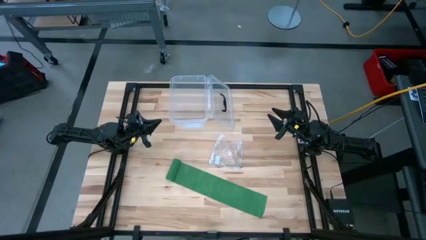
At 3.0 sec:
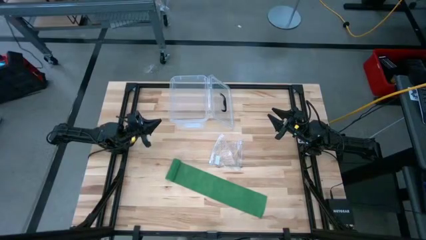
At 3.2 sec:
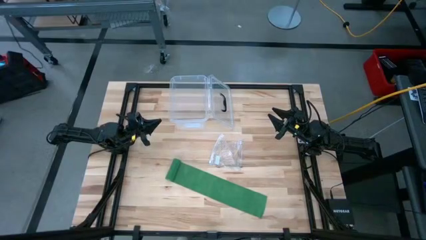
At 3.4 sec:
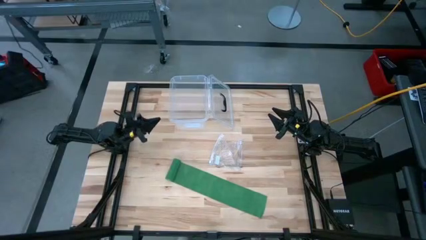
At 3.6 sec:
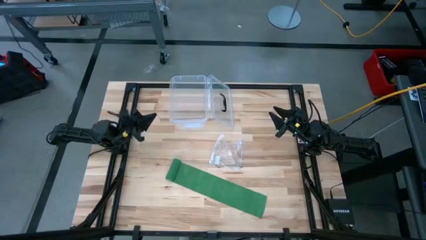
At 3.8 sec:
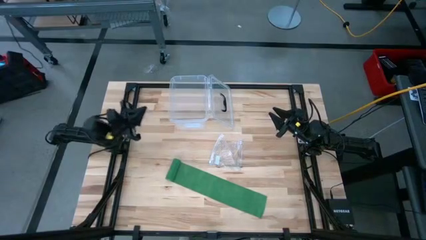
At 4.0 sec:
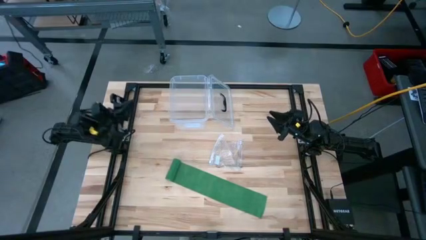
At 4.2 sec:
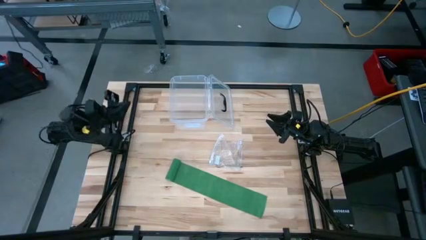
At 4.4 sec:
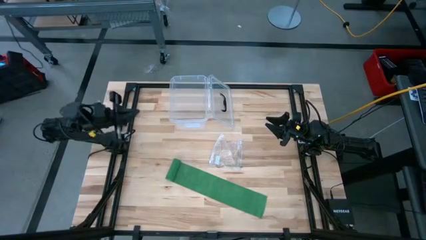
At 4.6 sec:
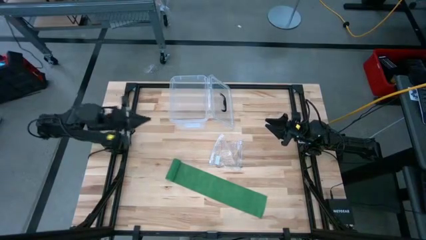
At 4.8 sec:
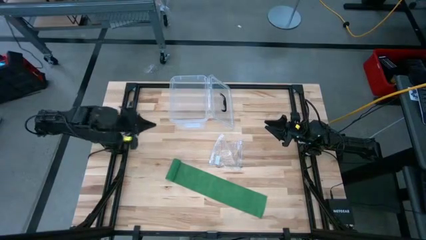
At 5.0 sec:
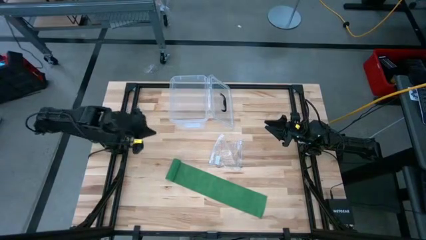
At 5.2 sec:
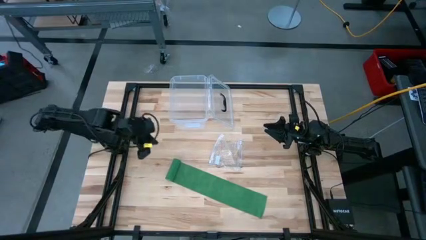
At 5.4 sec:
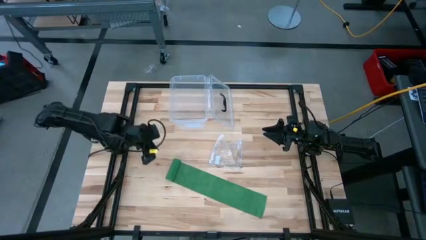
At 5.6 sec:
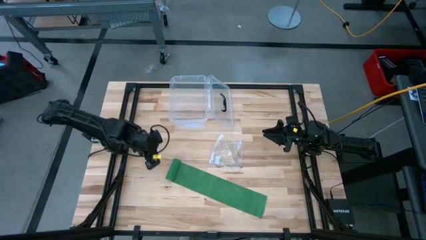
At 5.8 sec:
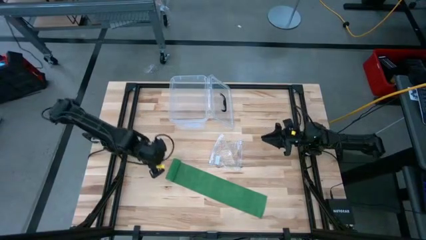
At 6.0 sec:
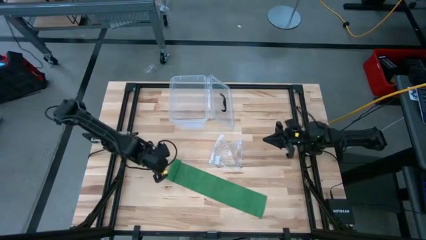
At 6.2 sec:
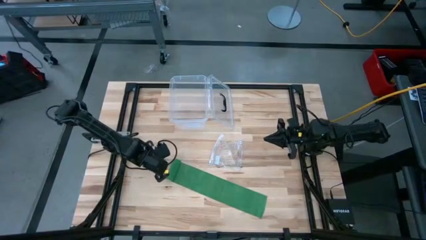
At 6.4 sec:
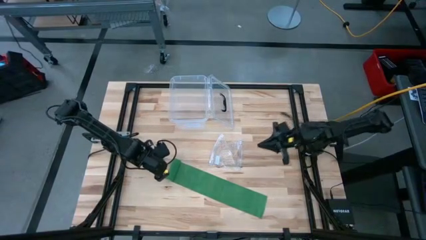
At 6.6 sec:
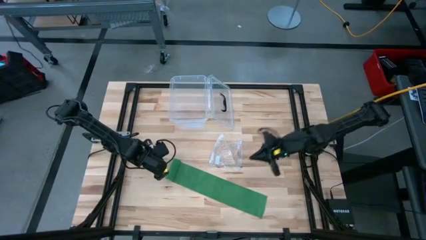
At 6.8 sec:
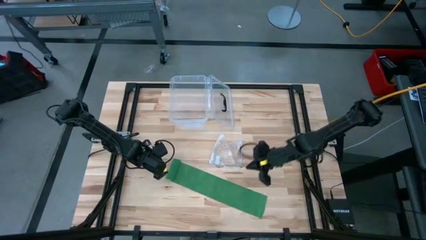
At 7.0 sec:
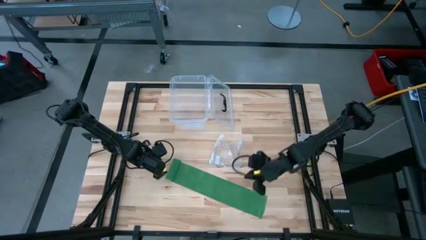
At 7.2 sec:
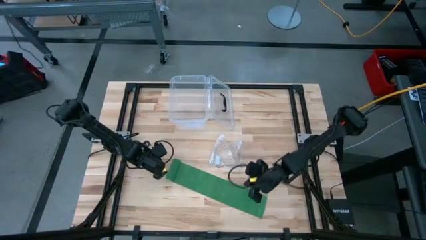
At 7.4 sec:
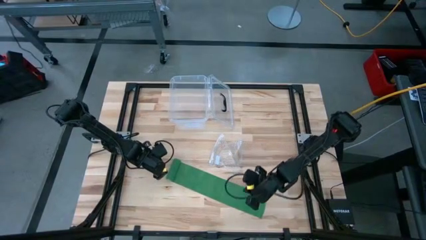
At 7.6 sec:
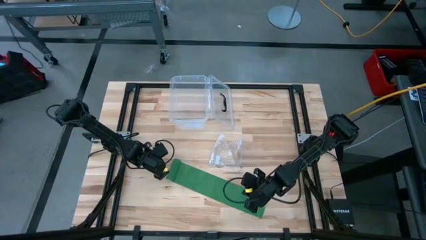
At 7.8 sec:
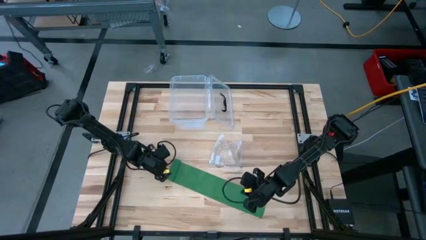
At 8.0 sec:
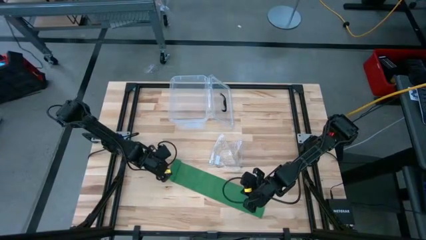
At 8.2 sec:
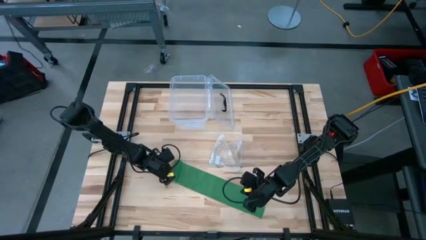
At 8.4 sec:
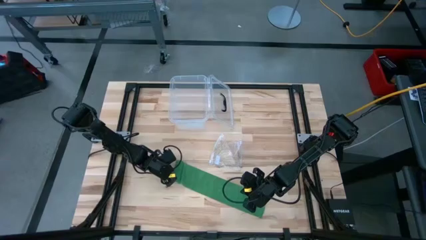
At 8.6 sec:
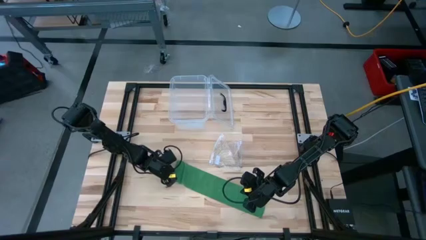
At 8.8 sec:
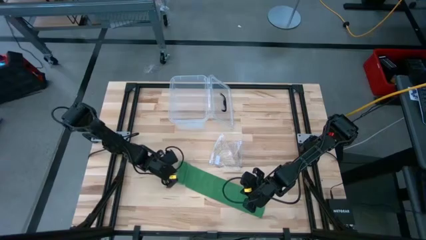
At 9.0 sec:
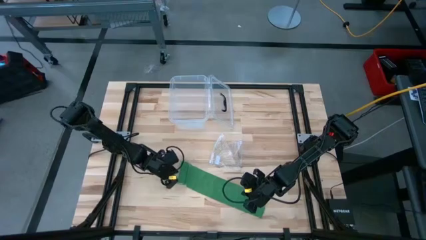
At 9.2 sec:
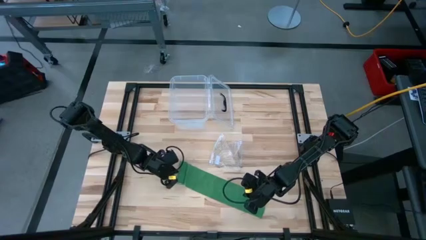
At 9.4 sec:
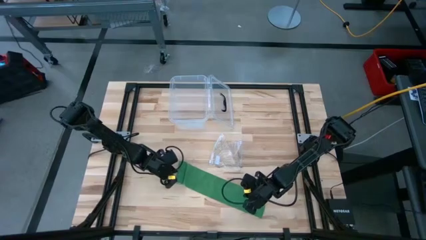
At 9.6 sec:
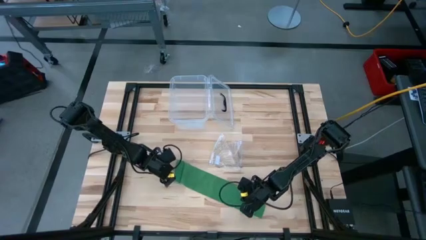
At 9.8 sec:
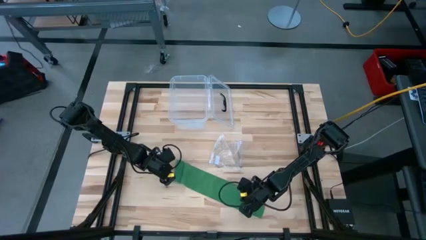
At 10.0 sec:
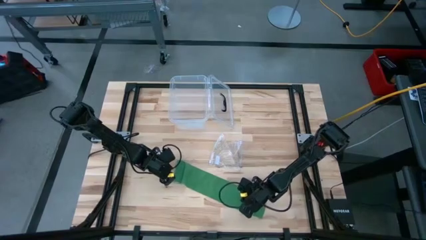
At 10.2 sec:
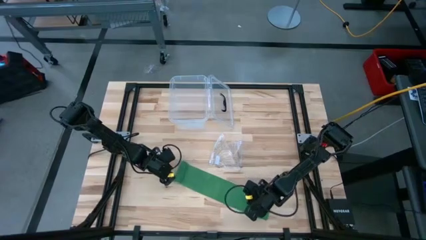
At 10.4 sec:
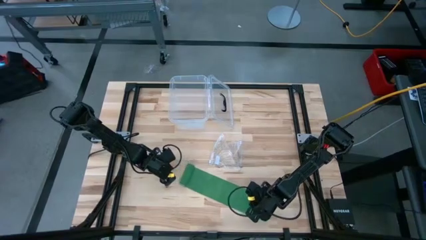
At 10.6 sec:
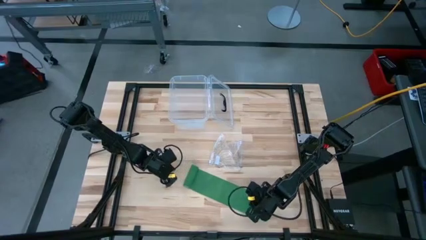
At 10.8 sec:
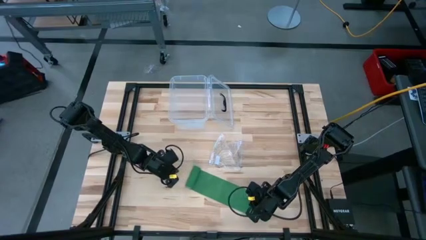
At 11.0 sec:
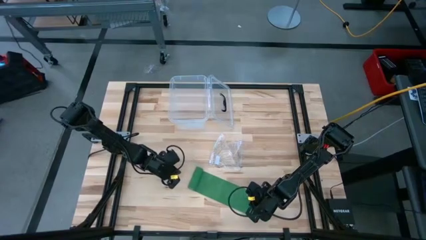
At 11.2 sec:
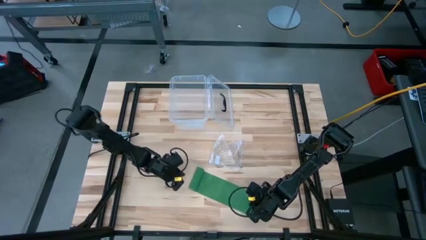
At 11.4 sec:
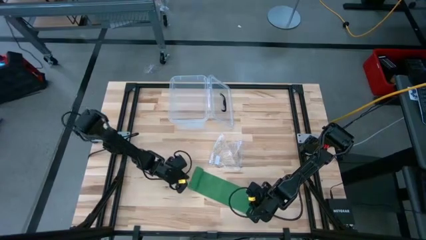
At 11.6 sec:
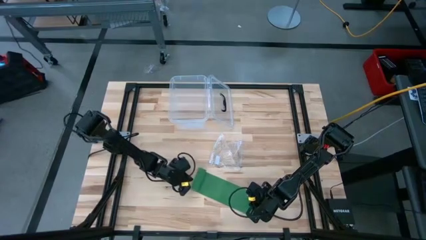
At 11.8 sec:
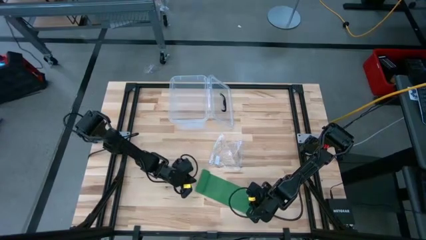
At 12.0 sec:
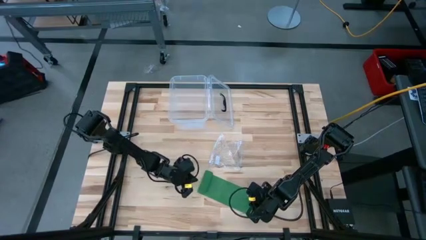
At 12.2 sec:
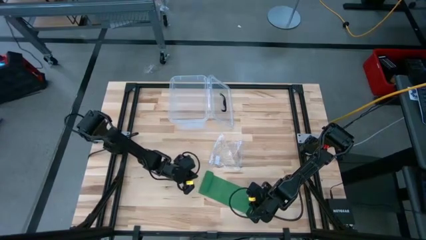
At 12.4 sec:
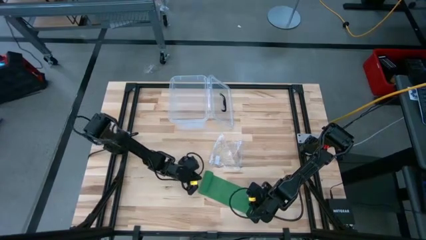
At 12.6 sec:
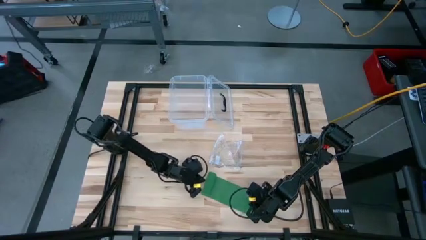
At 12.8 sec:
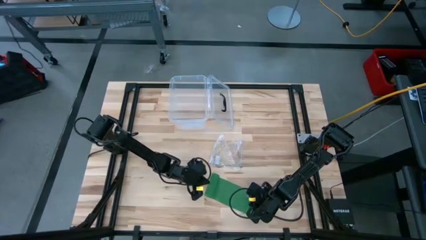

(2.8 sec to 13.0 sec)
Task: Roll bandage
Roll the green bandage

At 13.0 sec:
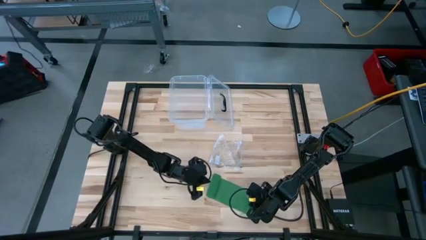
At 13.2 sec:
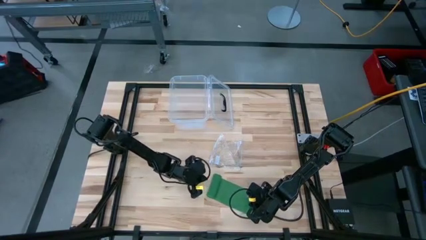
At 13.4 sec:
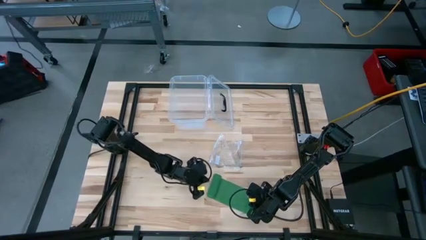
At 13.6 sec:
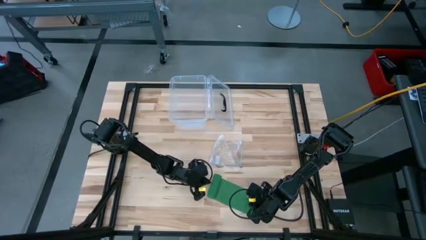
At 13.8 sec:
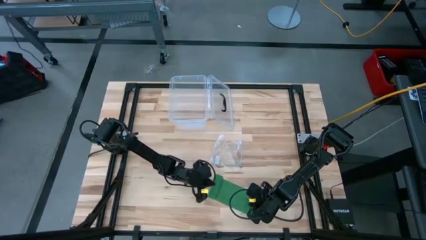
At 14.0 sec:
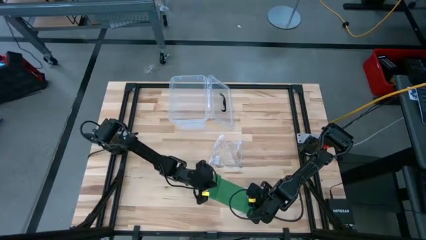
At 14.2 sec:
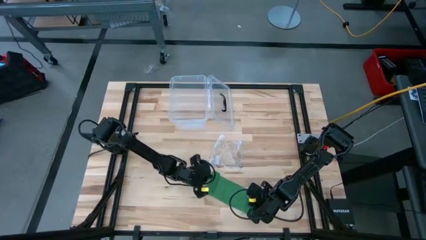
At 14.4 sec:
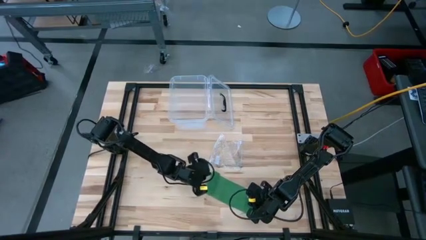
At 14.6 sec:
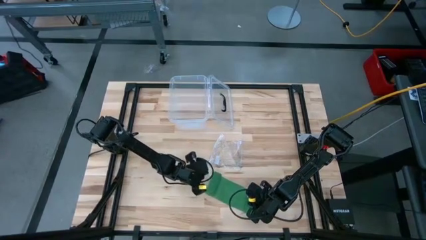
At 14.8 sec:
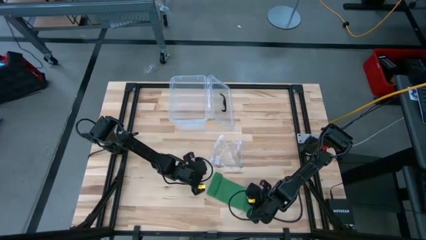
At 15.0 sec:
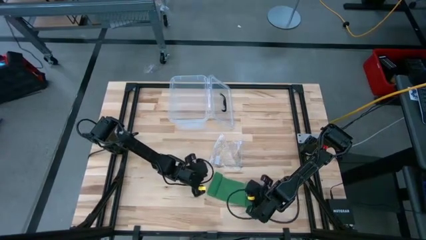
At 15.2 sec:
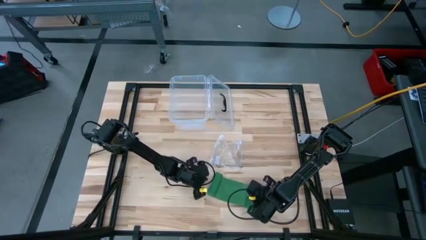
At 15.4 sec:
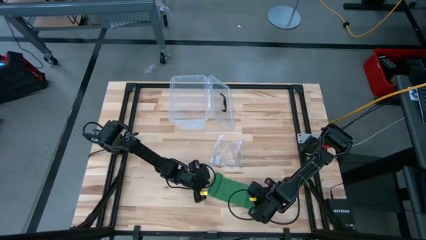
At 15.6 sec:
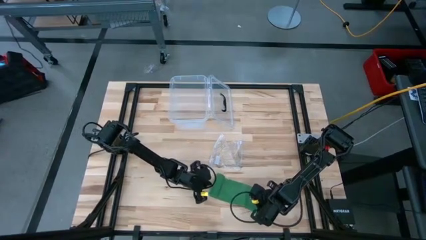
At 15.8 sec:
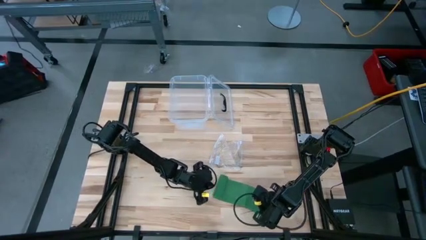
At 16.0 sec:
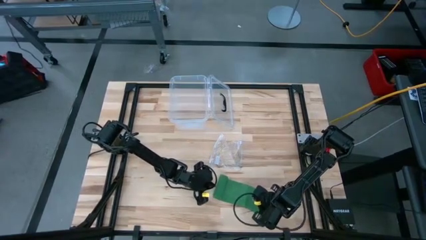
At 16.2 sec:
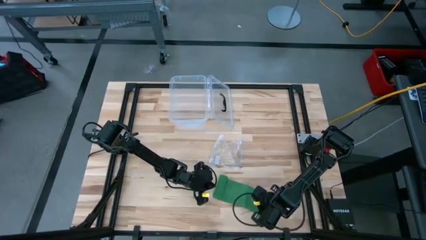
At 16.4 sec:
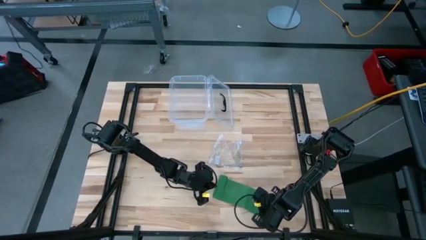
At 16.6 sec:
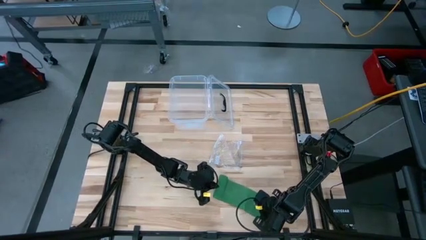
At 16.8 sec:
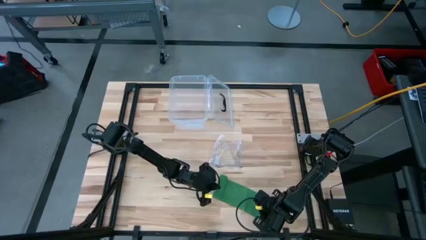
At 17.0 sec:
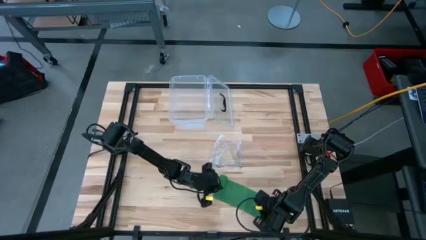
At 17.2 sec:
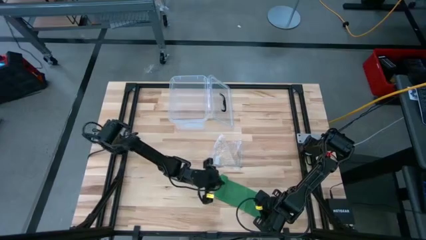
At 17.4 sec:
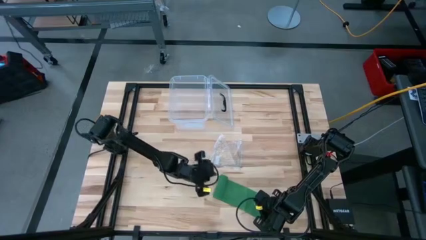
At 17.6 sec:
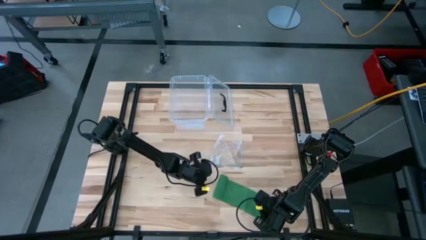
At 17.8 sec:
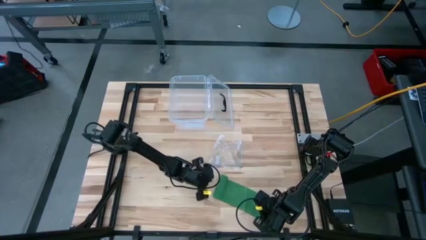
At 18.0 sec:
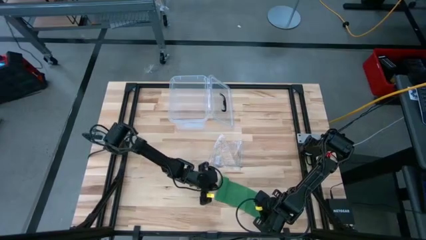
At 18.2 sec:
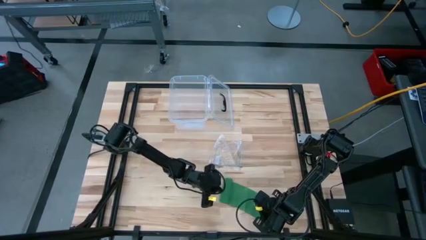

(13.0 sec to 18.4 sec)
Roll the green bandage

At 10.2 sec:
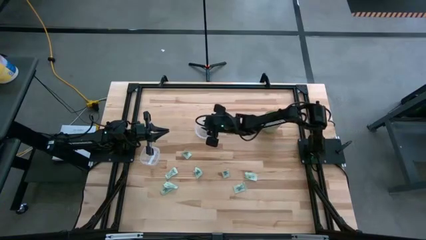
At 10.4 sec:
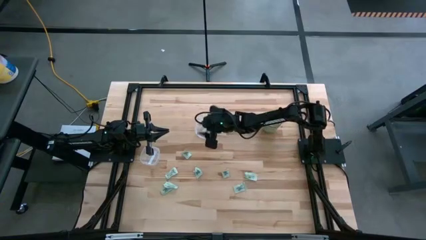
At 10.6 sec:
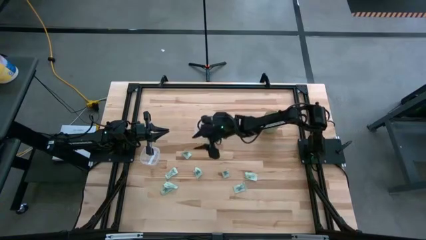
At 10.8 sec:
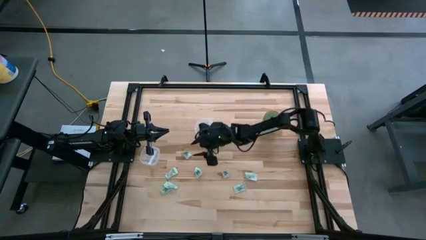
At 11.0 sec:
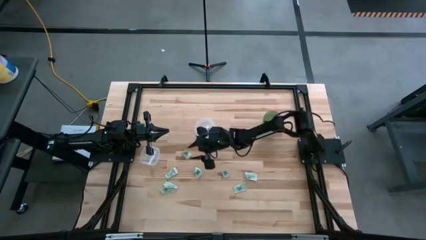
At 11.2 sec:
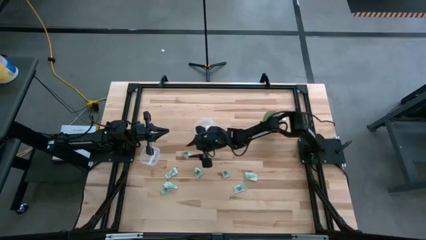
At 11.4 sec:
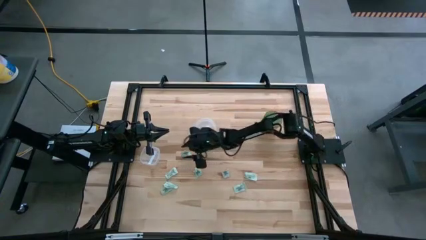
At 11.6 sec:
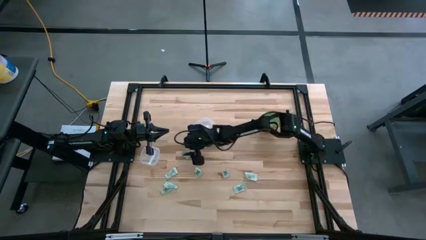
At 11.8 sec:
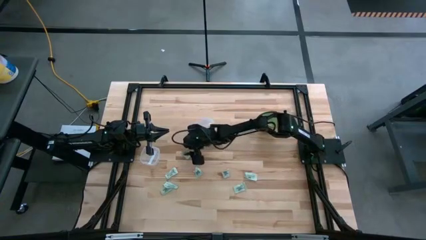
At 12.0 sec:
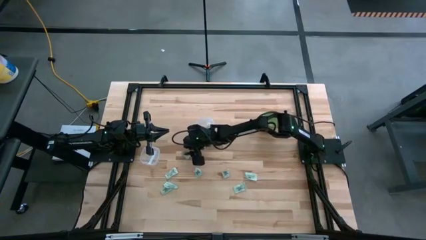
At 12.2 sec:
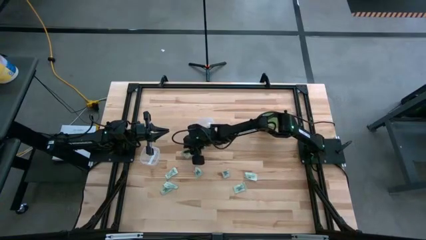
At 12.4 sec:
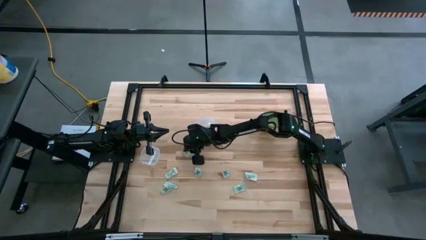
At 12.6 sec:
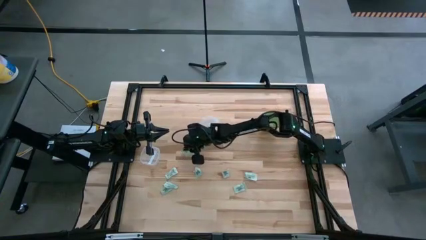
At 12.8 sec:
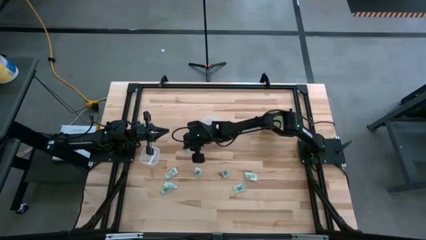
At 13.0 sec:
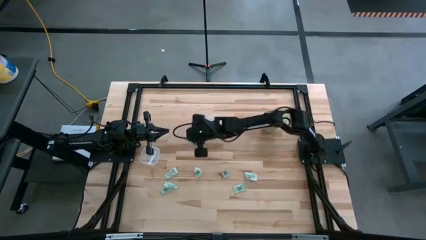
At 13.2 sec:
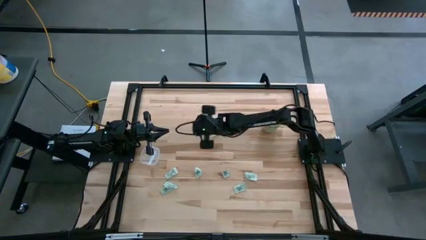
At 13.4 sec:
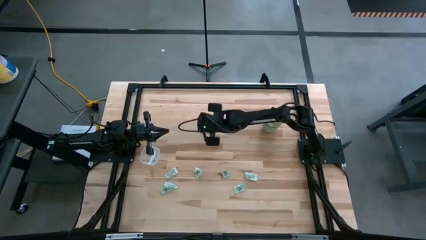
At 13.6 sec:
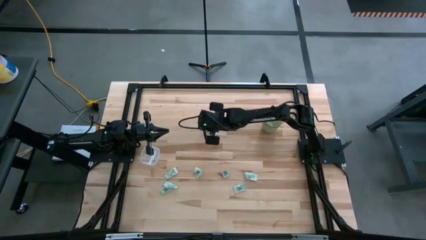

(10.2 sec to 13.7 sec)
Task: Pick and place Stevia / Truvia into bins
Put the stevia packet into the right transparent container
